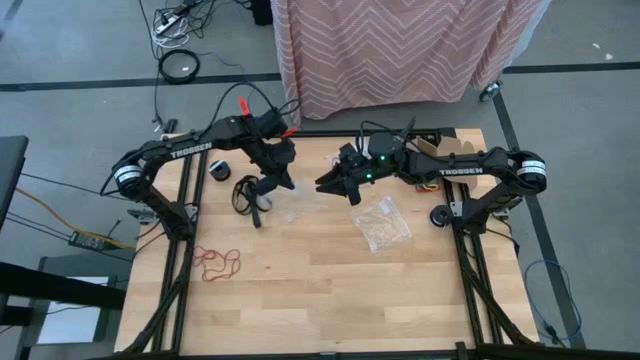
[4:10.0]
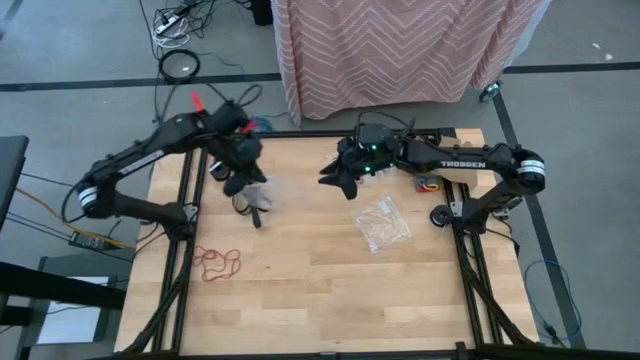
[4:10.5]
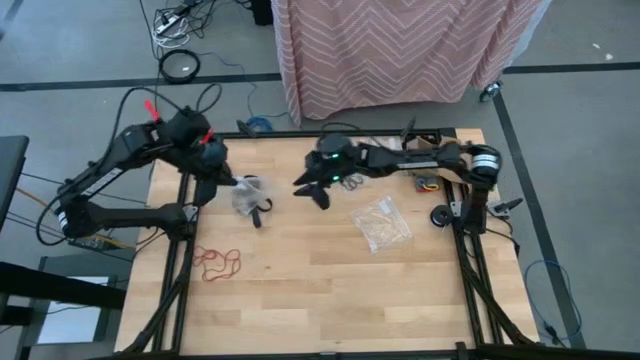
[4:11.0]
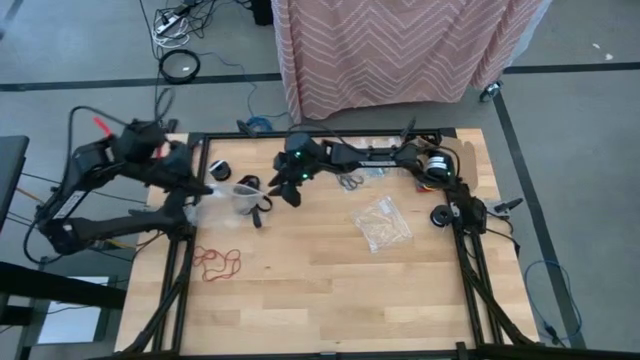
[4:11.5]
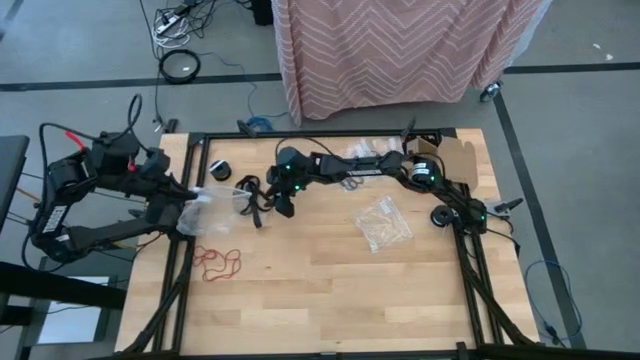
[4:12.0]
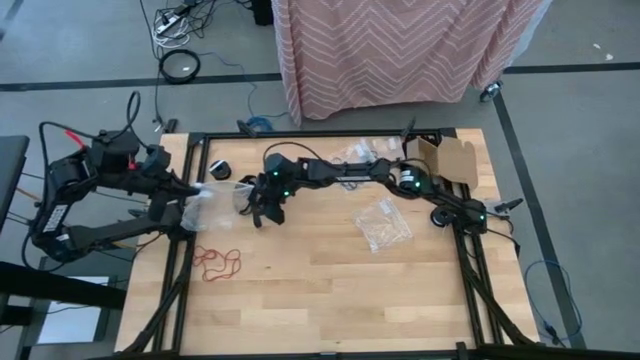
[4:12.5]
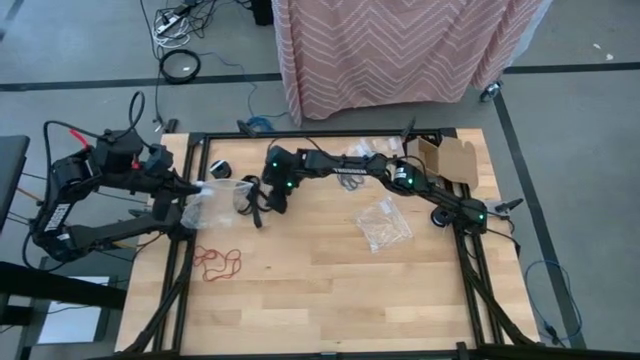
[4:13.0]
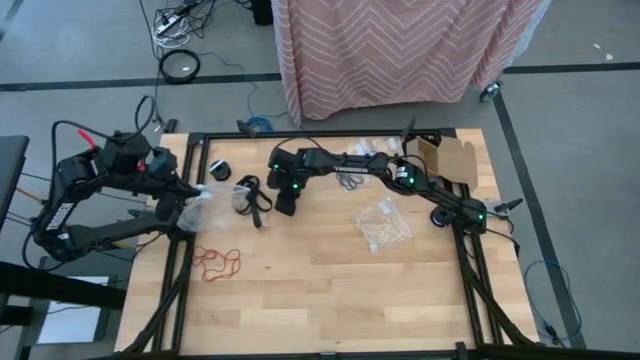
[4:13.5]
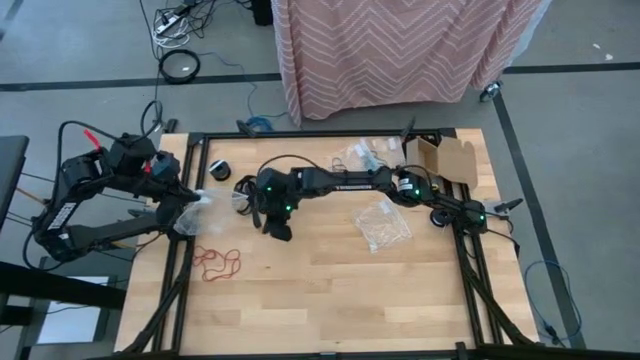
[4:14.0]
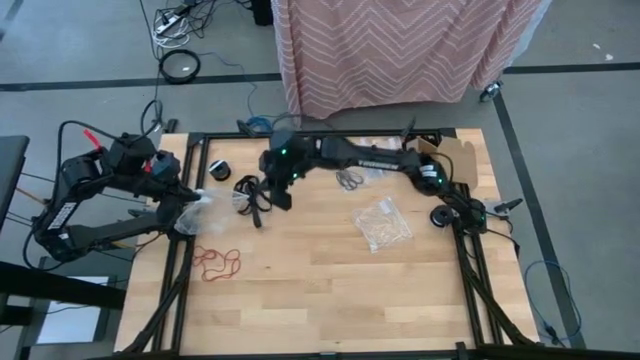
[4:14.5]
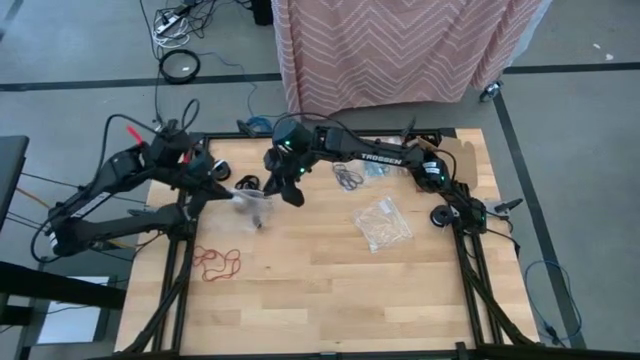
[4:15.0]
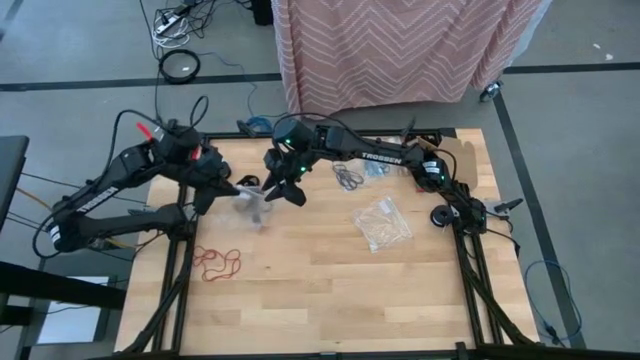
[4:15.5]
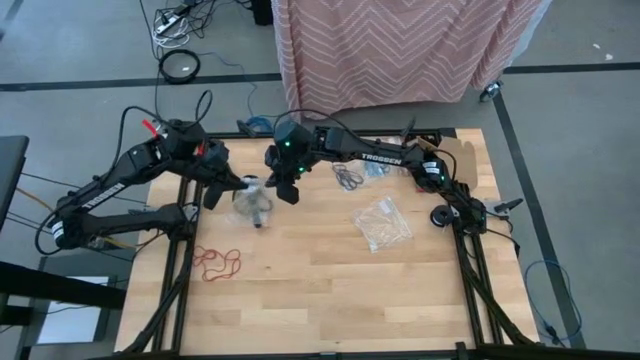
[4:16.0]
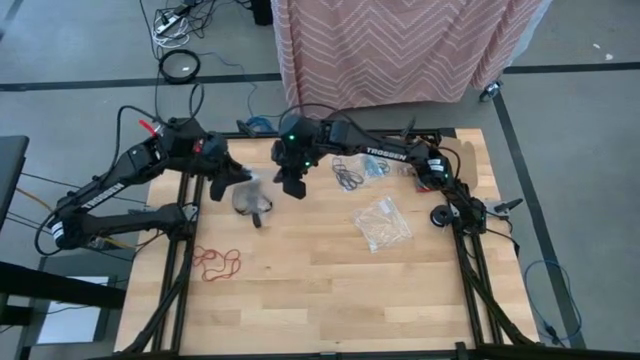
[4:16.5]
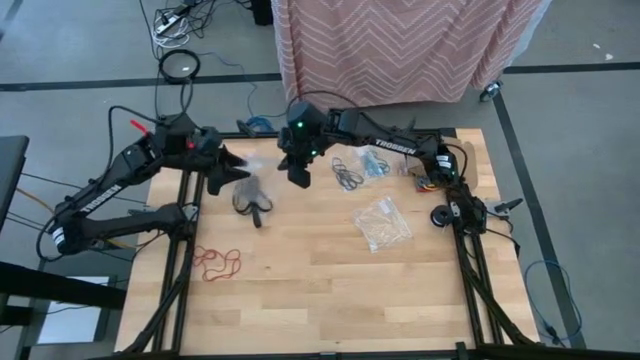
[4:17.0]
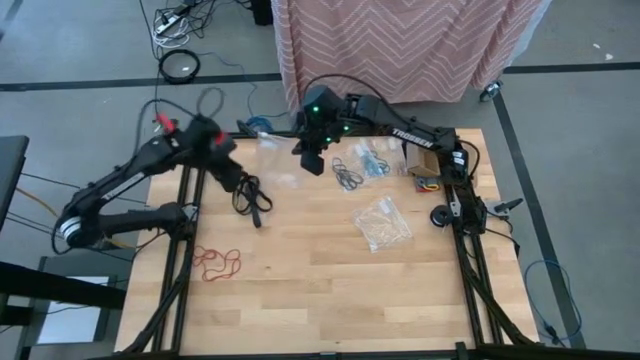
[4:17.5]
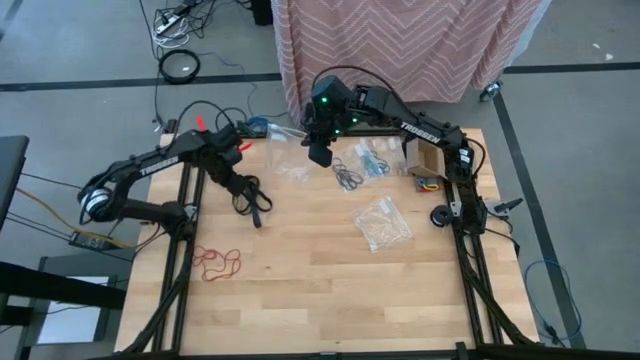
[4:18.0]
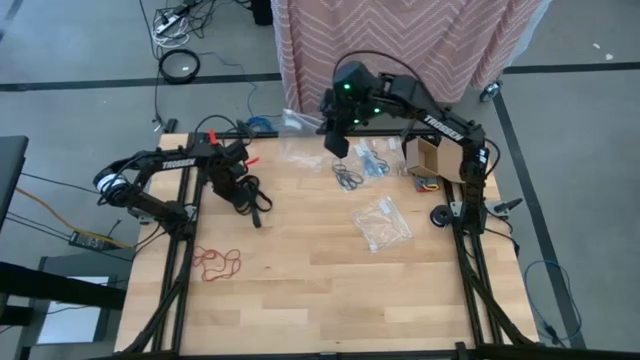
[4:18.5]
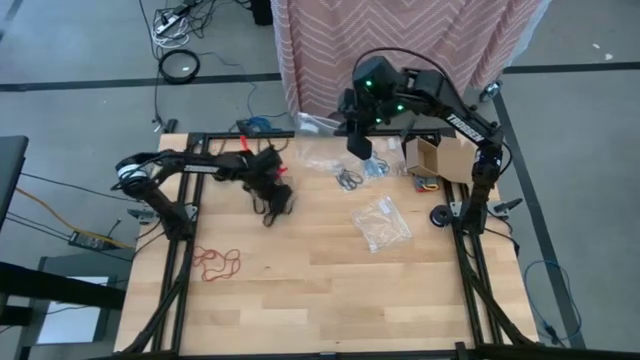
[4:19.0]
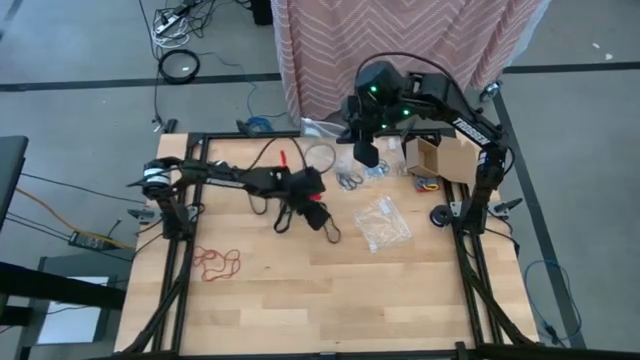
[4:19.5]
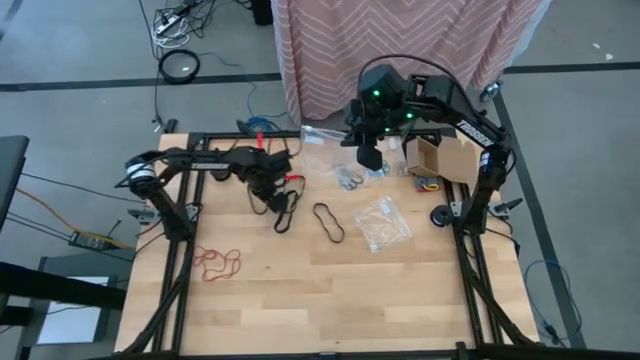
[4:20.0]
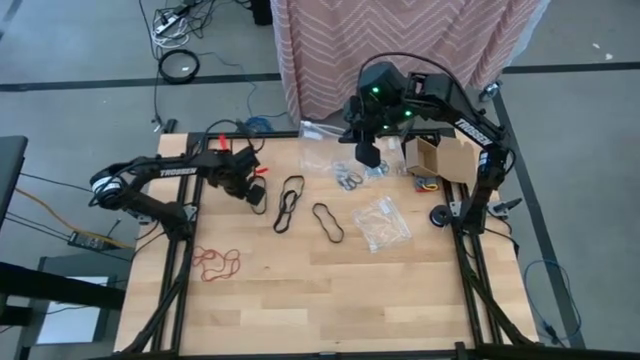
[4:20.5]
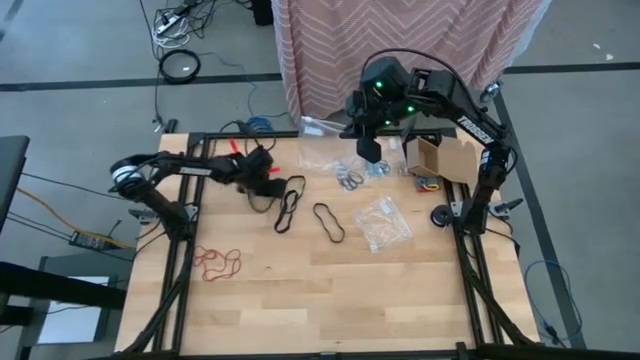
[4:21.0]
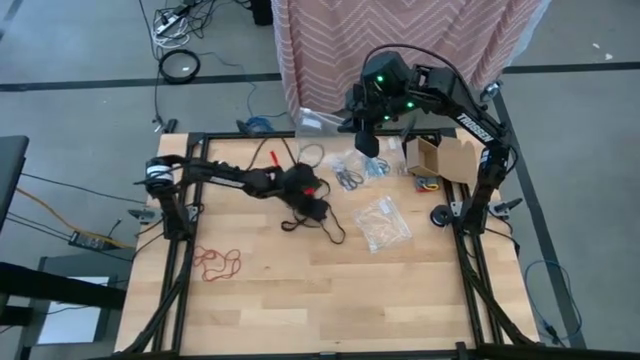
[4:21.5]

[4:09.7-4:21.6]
Task: Sort rubber bands
Move the black rubber bands to the center of the table

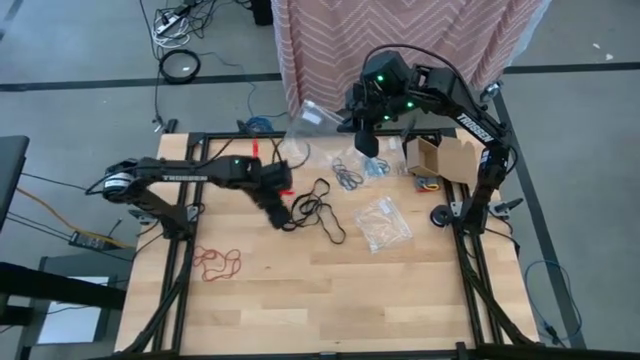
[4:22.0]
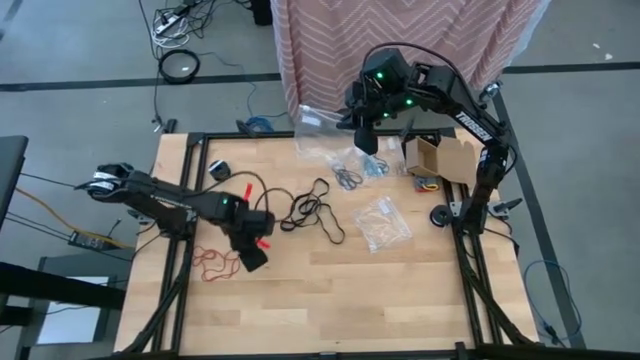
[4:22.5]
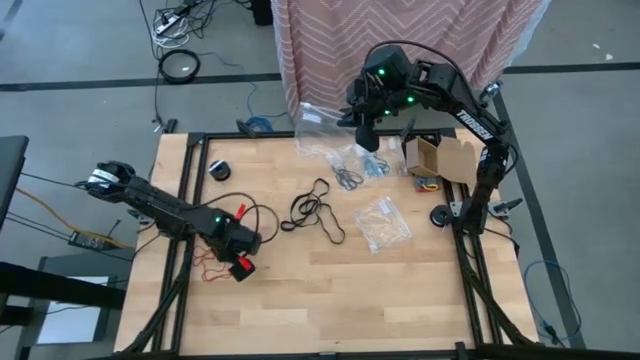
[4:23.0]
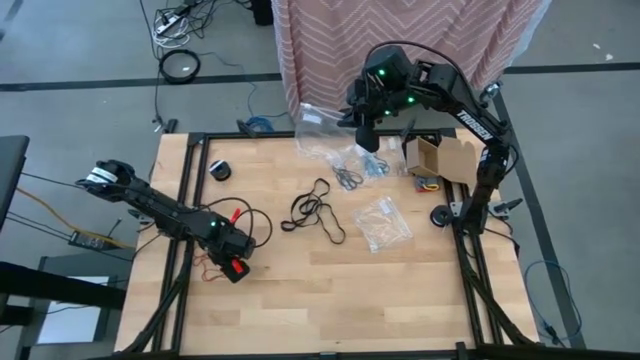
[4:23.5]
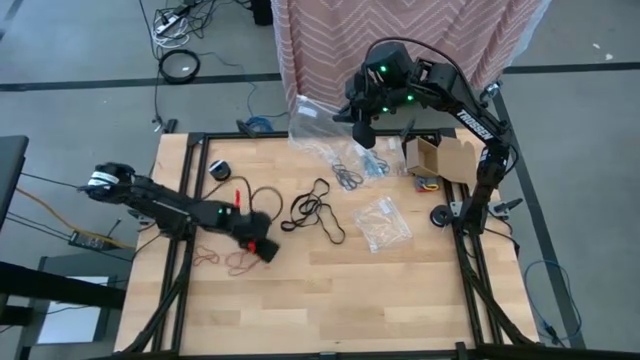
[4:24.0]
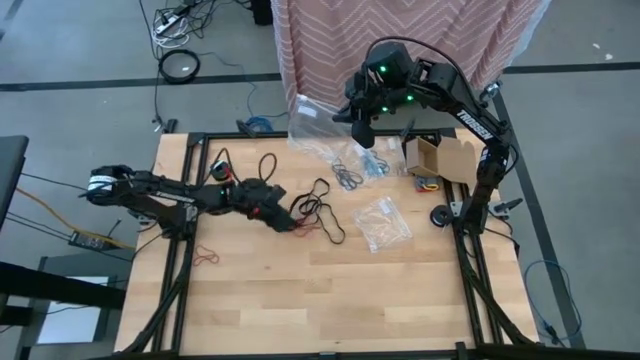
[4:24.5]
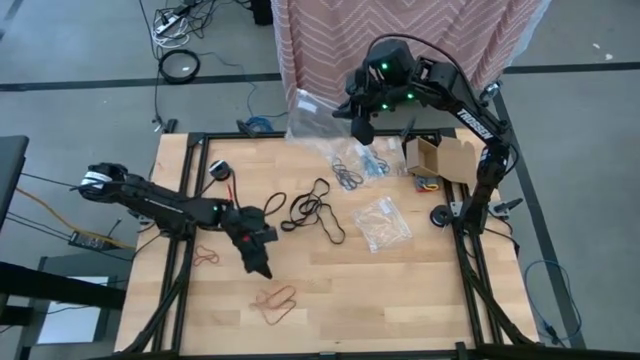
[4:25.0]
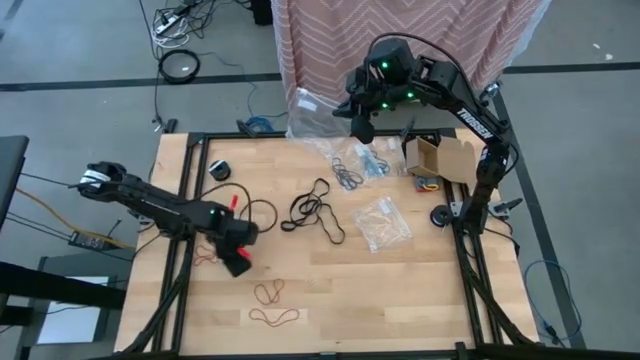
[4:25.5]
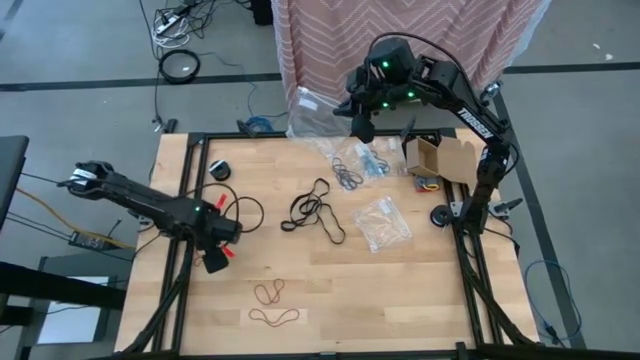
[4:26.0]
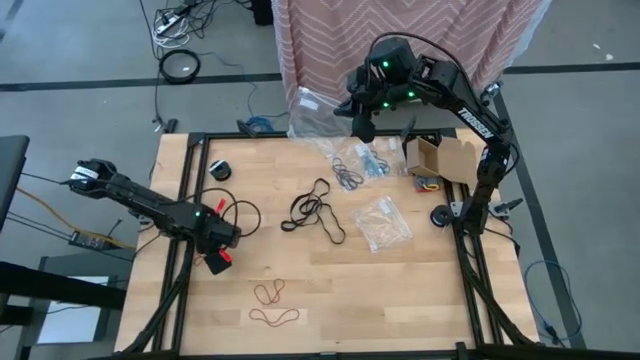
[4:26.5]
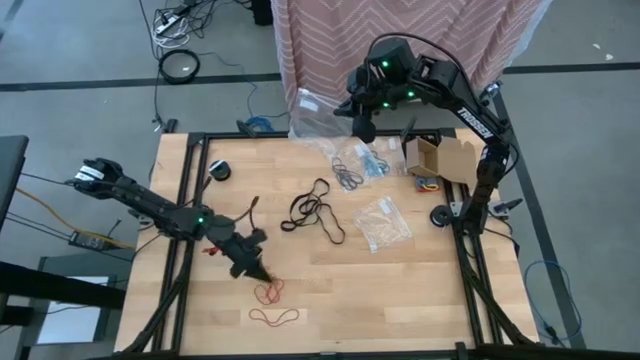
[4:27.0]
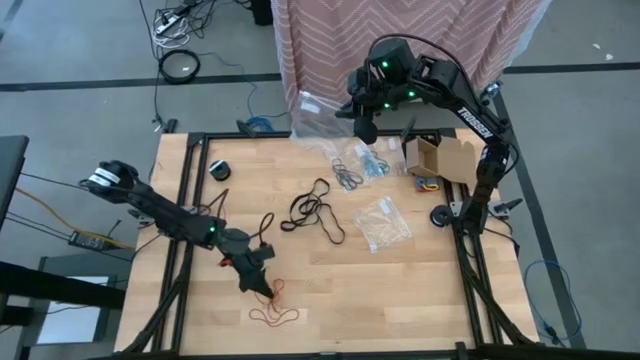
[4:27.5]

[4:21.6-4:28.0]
Prepare the red rubber bands to the bottom center of the table

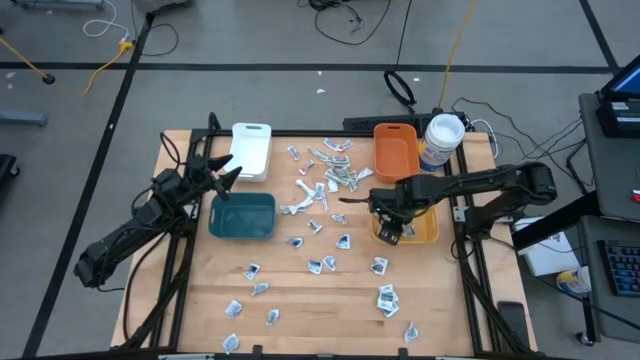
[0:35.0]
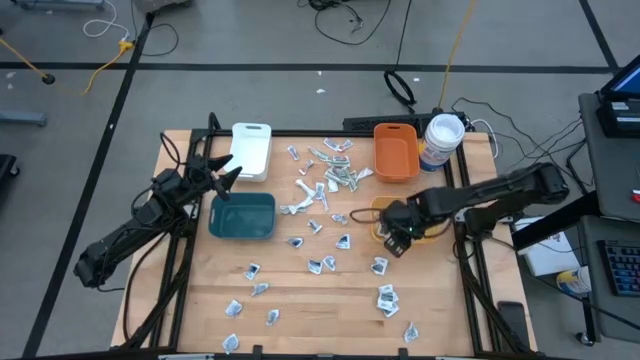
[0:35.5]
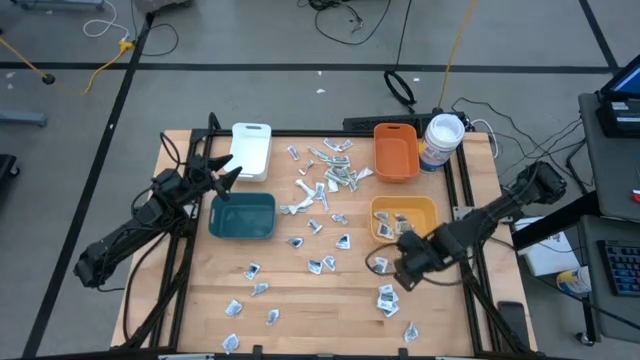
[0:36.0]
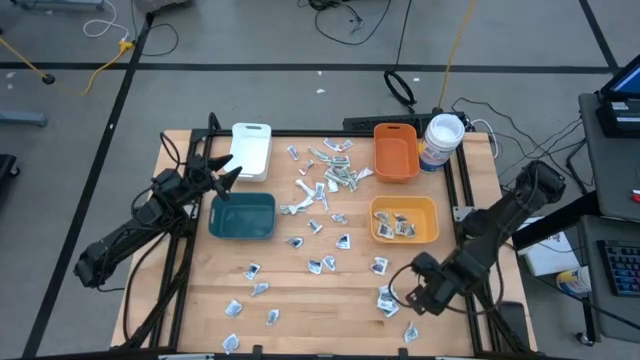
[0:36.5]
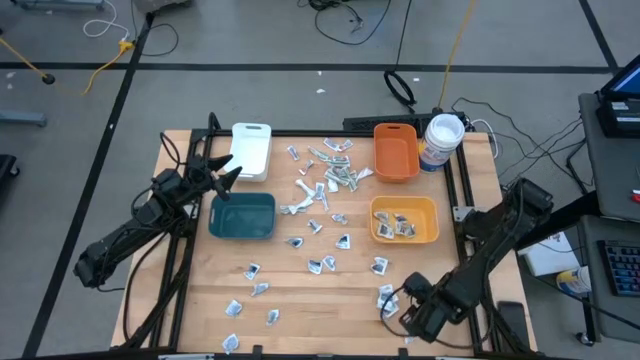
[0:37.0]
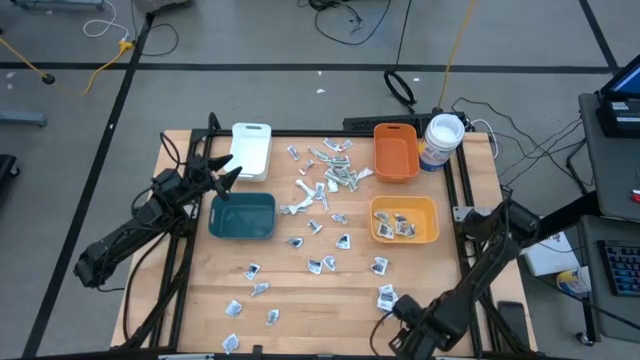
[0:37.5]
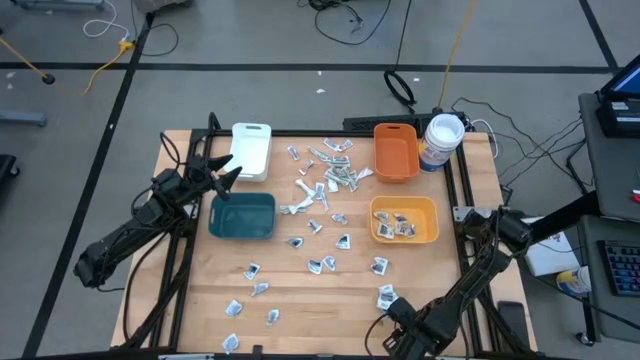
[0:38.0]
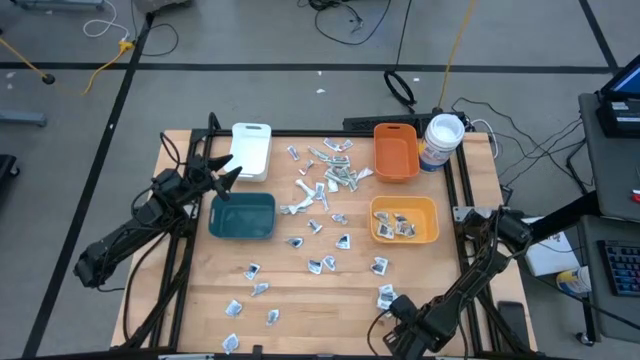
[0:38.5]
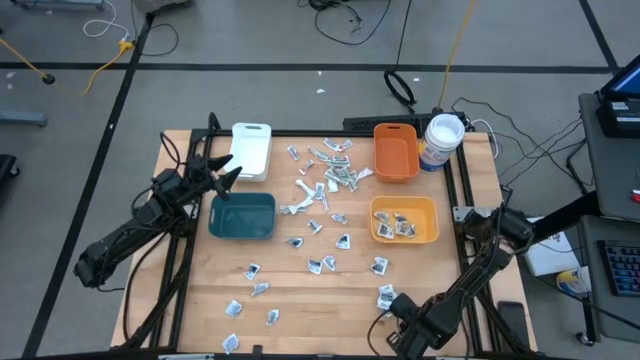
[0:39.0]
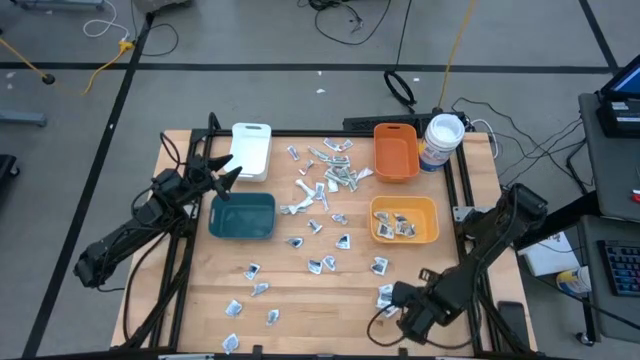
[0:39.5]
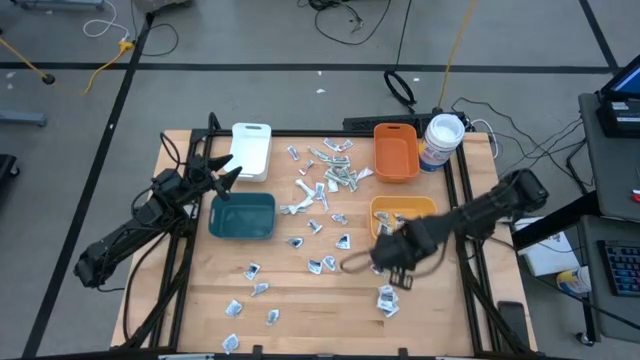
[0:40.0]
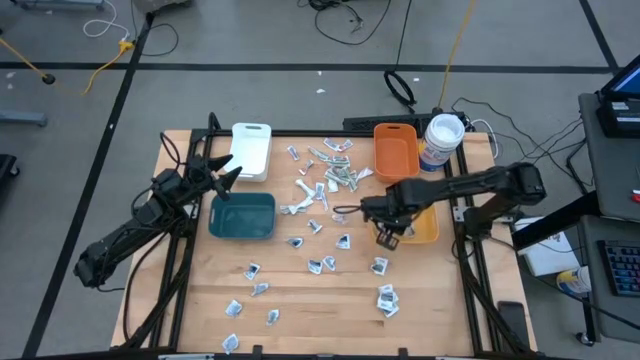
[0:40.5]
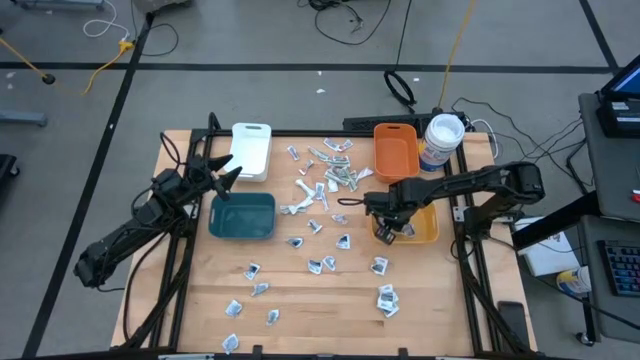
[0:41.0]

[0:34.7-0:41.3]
Task: Pick & Place First Aid Supplies
Put the antiseptic towelette into the yellow bin
